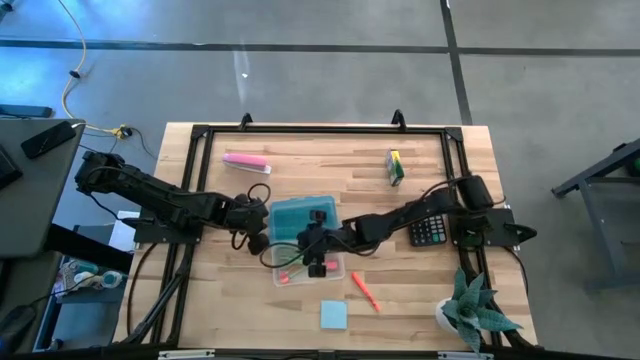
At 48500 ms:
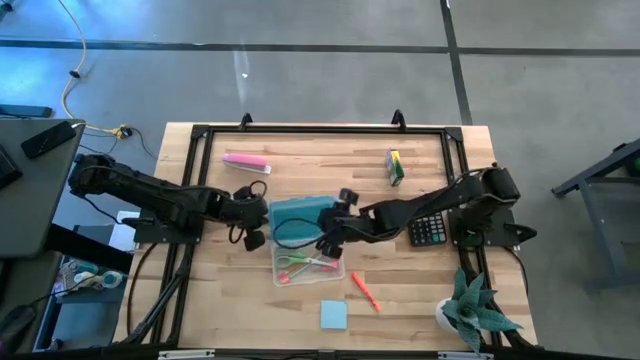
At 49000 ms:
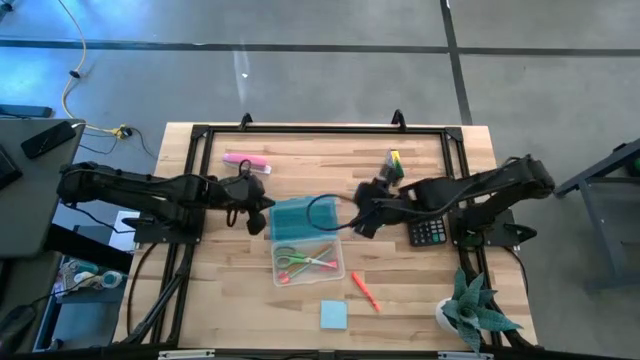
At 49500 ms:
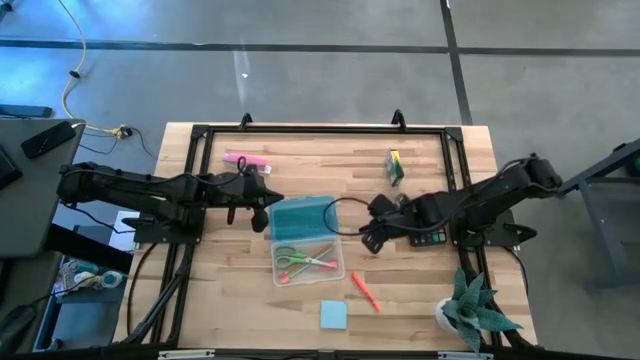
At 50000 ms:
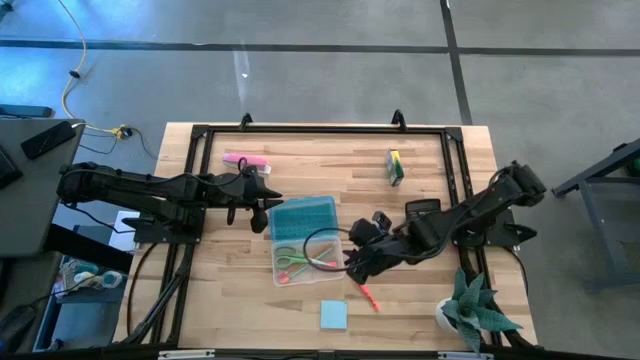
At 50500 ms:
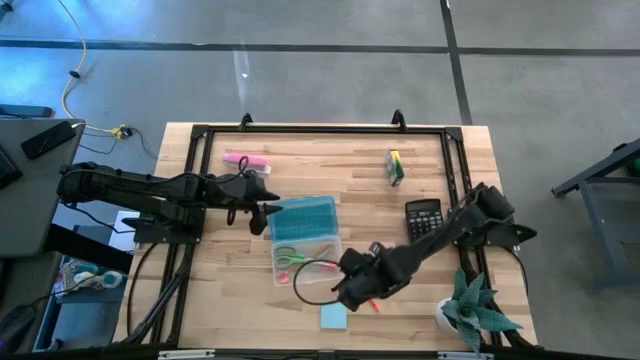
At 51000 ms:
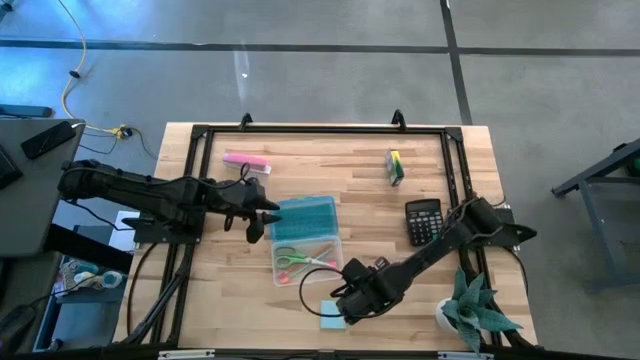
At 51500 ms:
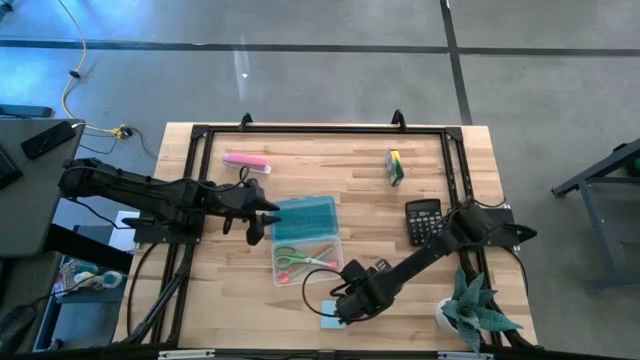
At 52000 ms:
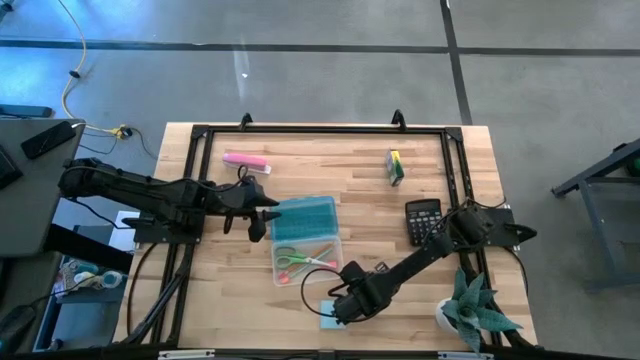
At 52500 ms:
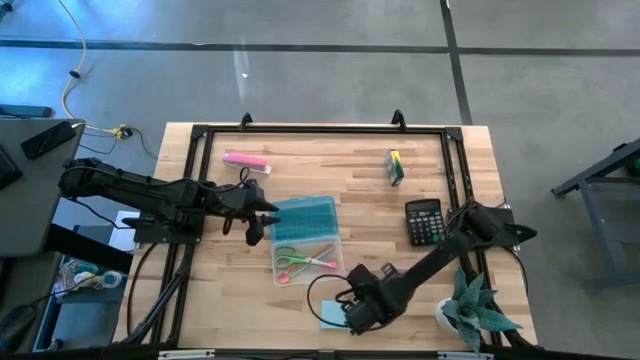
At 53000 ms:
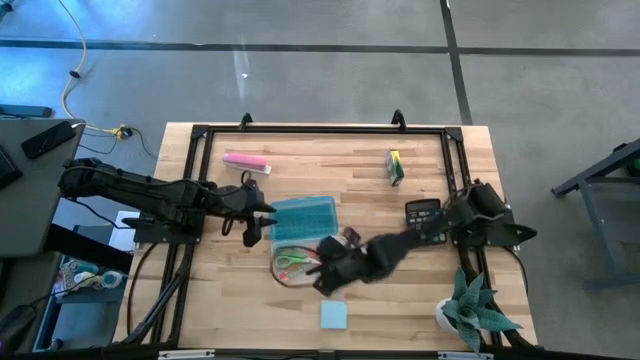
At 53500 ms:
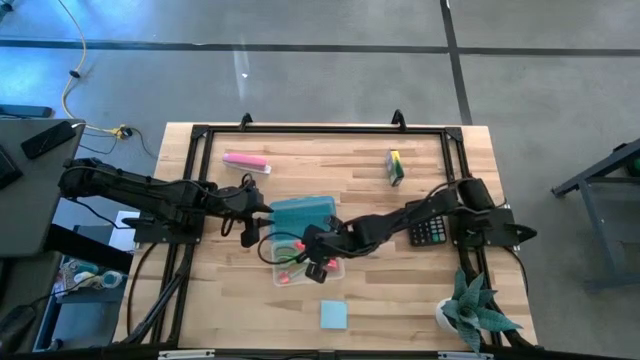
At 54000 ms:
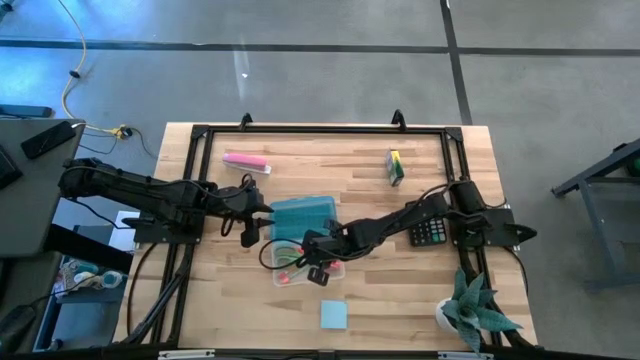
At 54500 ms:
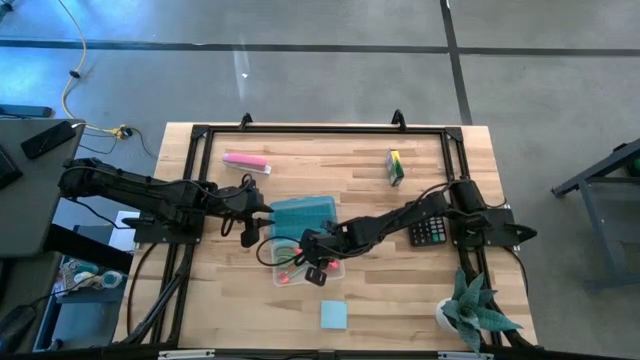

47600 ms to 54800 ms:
Task: Pack school essentials
Put the orange pen into the supply box

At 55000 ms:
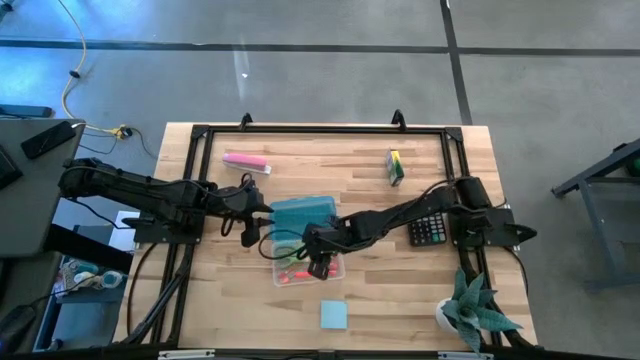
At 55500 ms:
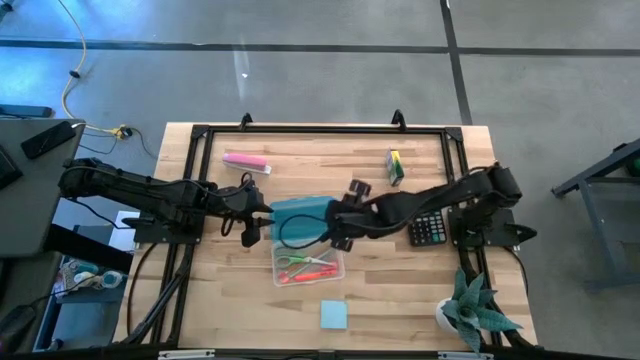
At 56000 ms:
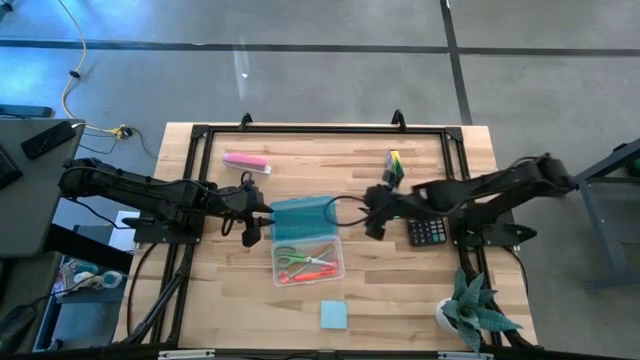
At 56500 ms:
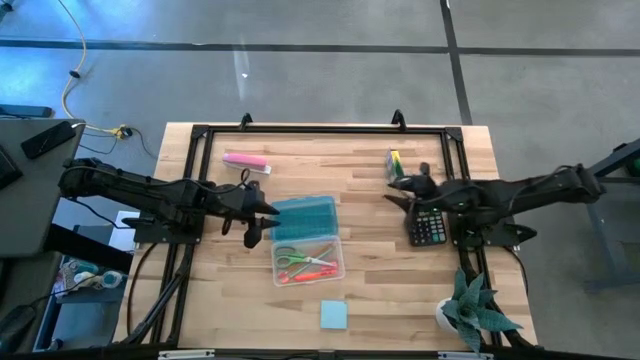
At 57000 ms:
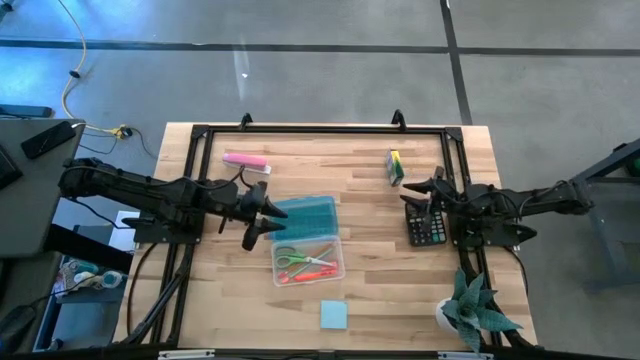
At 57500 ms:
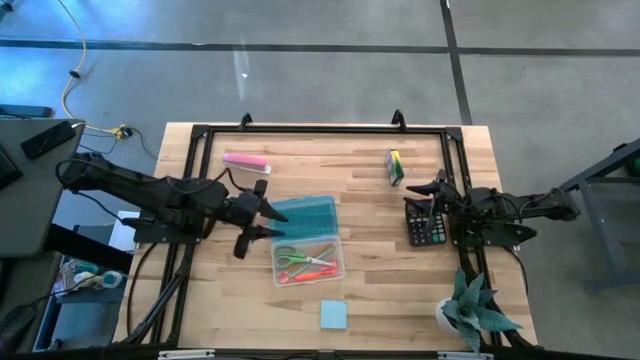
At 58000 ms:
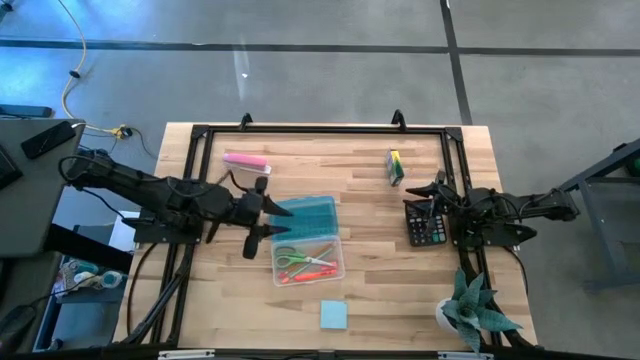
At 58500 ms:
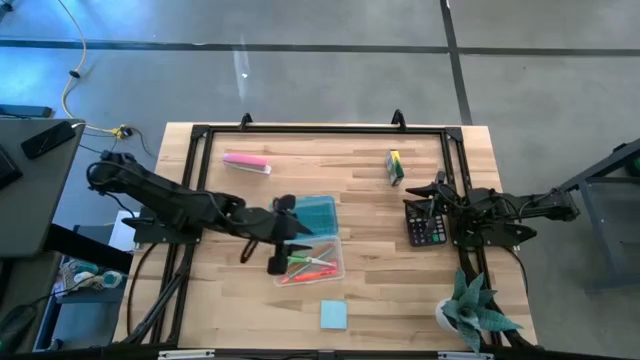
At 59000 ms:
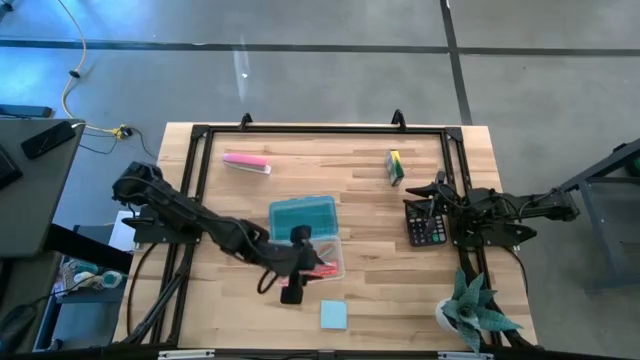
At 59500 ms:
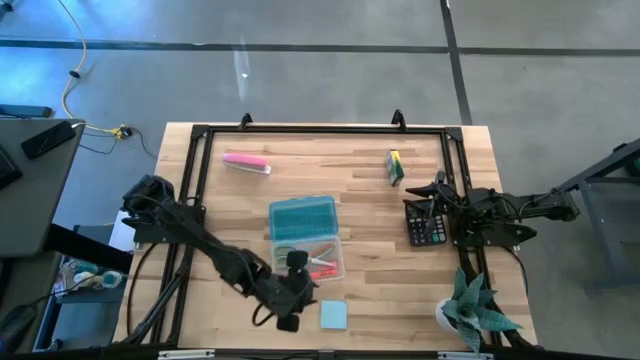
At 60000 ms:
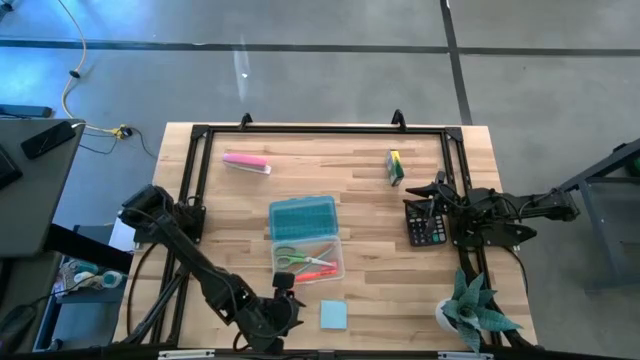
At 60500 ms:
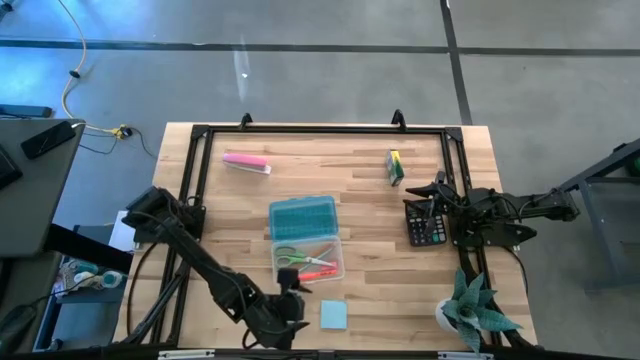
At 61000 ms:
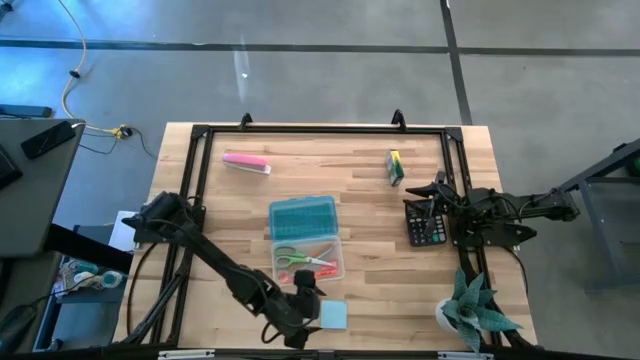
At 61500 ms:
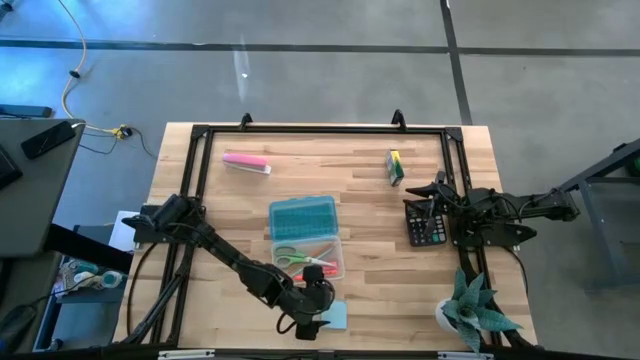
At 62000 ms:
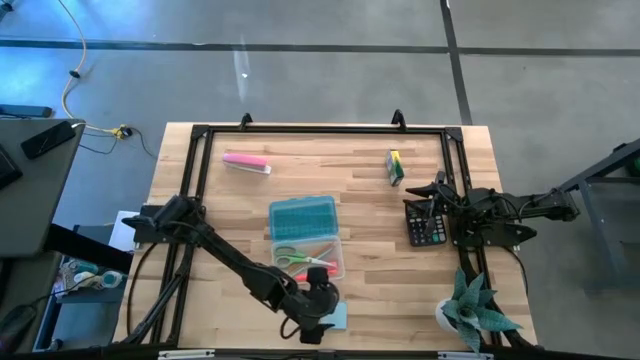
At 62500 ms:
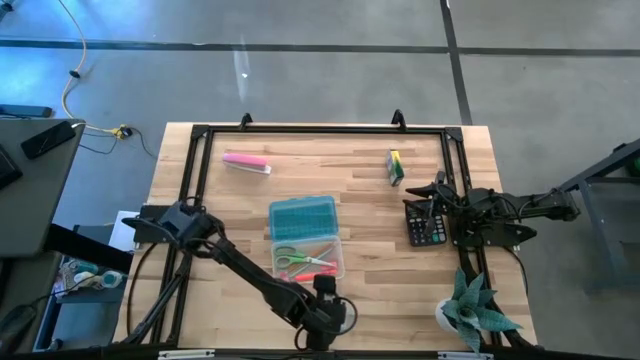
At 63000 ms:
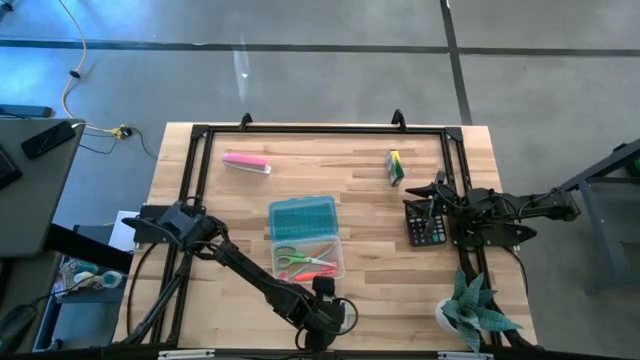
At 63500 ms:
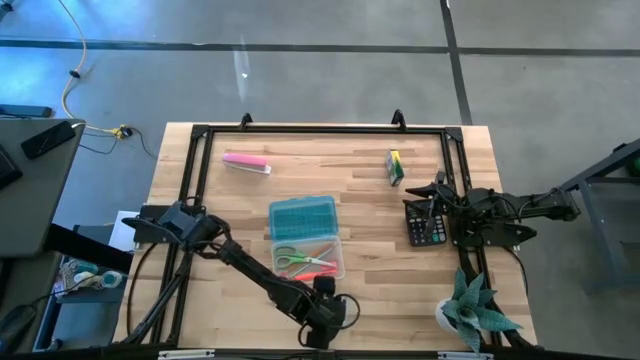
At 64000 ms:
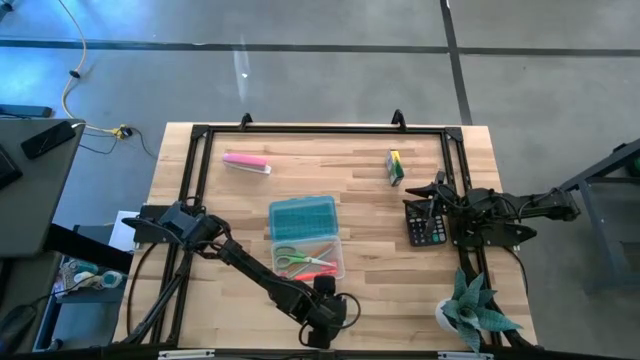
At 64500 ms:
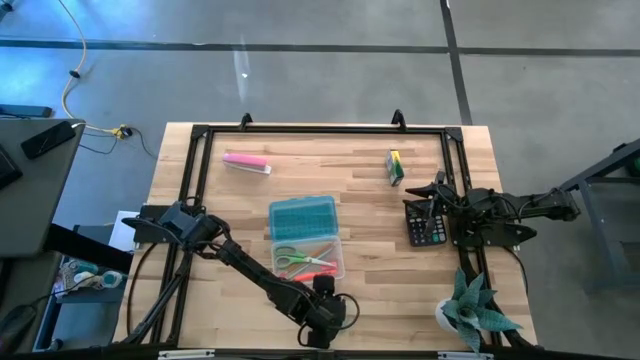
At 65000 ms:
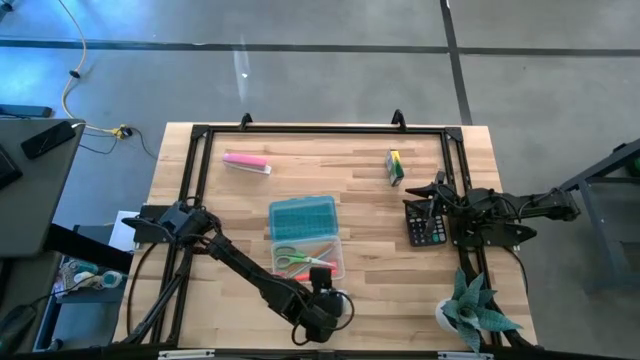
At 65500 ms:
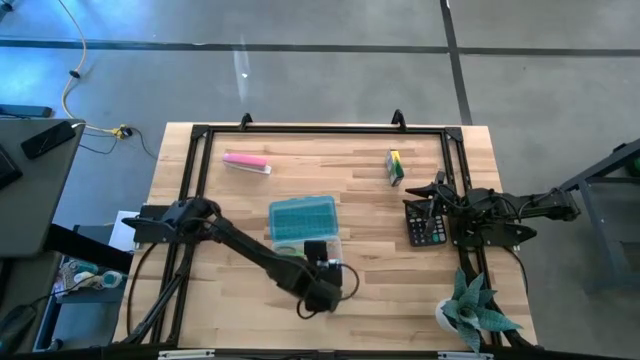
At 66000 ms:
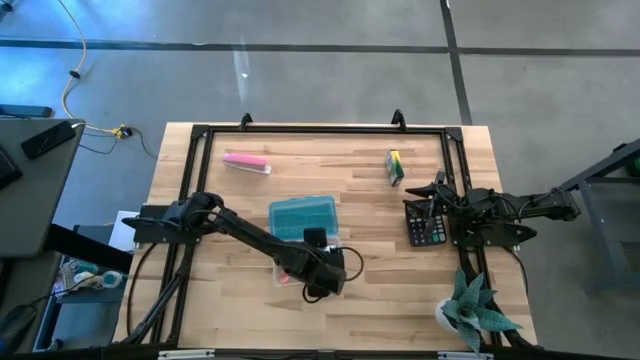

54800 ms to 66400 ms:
Put the blue sticky notes into the supply box

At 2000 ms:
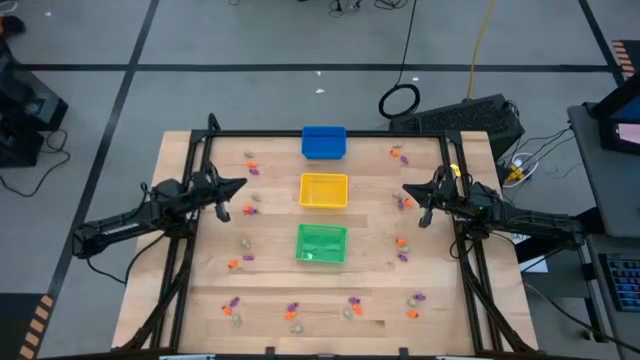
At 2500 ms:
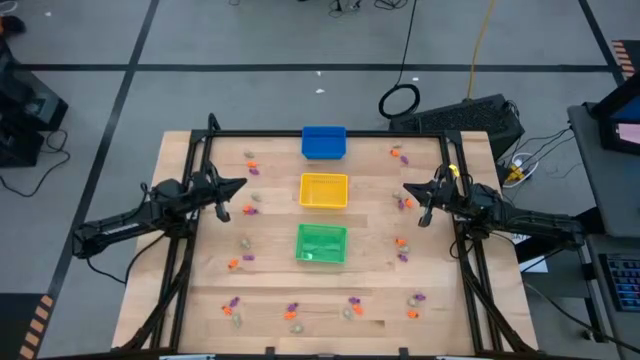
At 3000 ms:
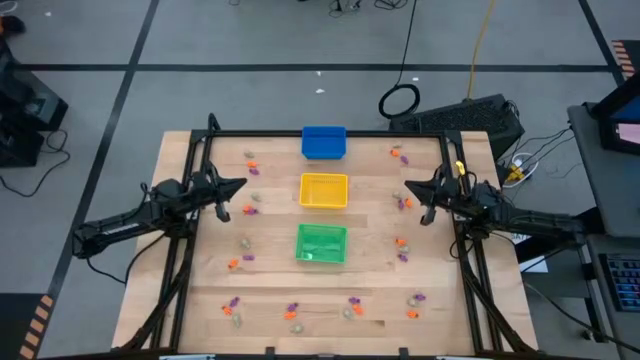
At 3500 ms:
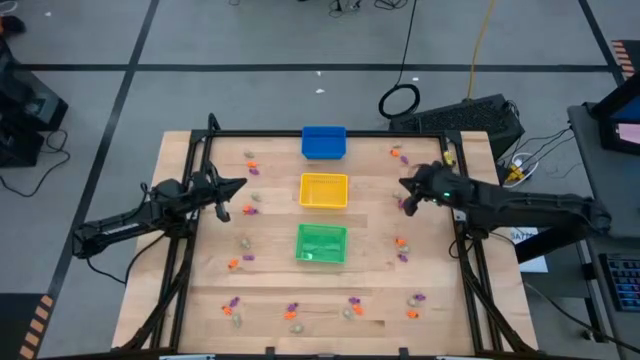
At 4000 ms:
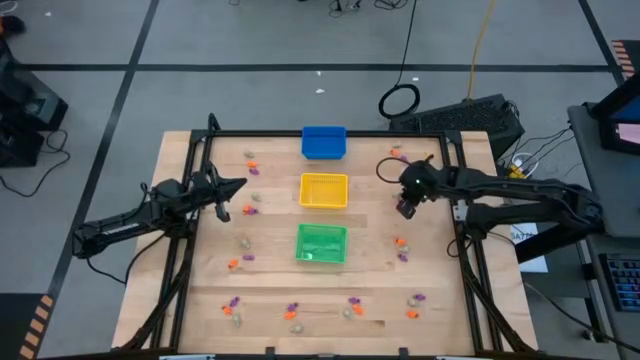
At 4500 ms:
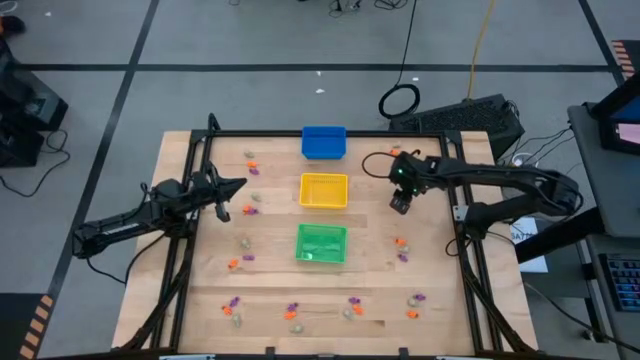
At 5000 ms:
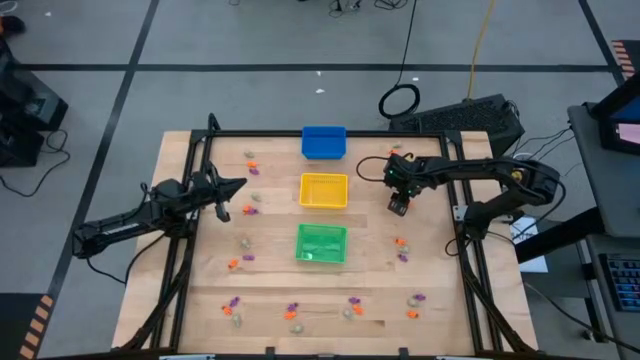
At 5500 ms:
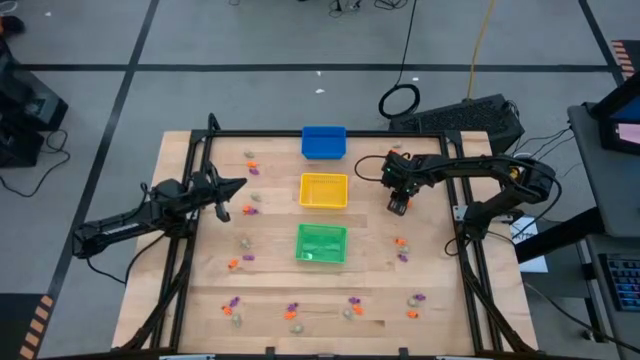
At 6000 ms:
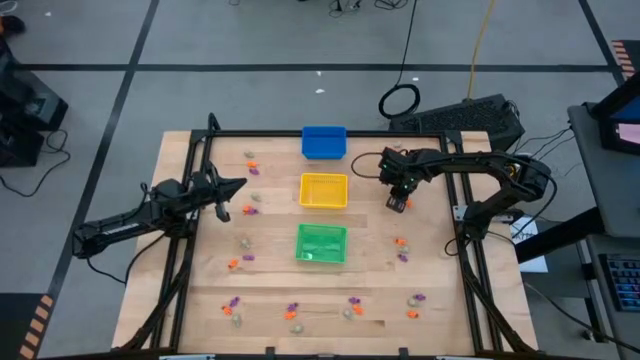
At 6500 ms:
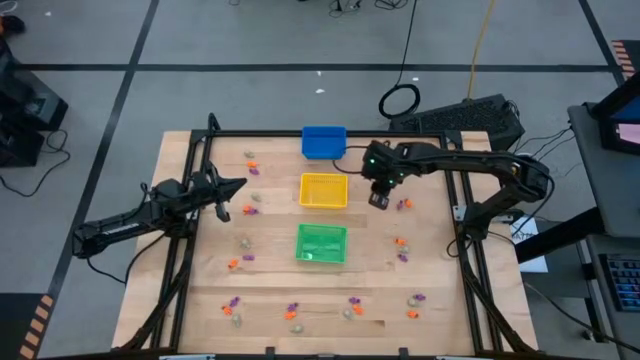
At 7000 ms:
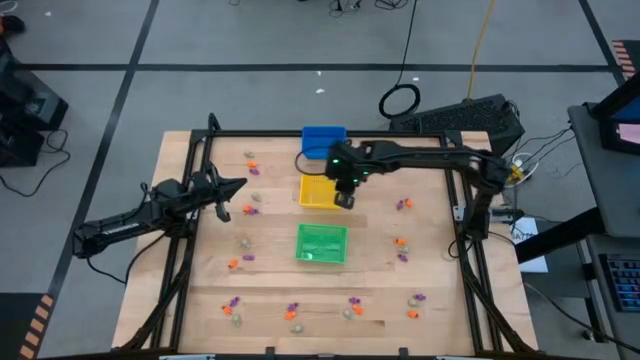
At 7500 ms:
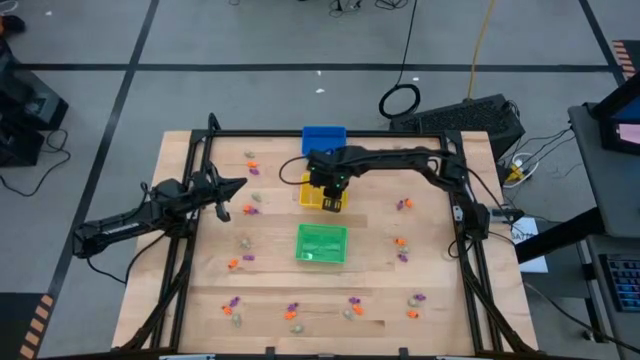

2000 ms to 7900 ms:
Task: Sort Halloween decoration
Put the skull toy into the yellow bin
